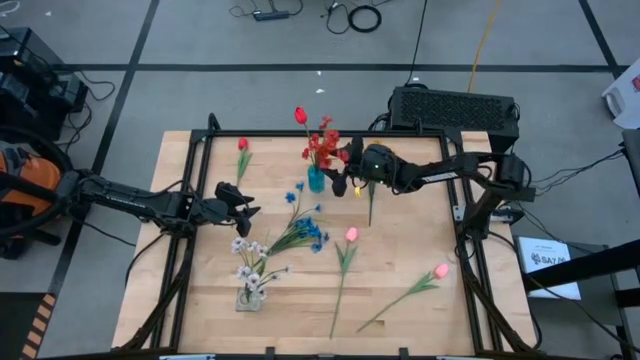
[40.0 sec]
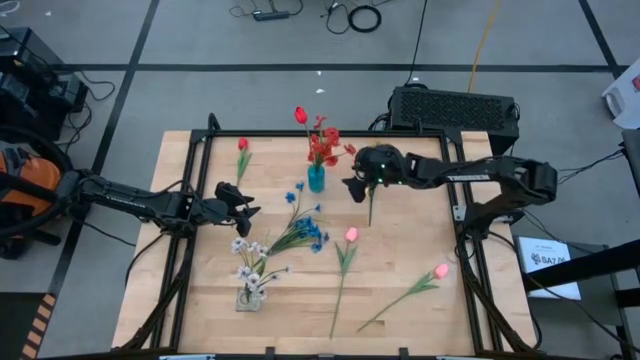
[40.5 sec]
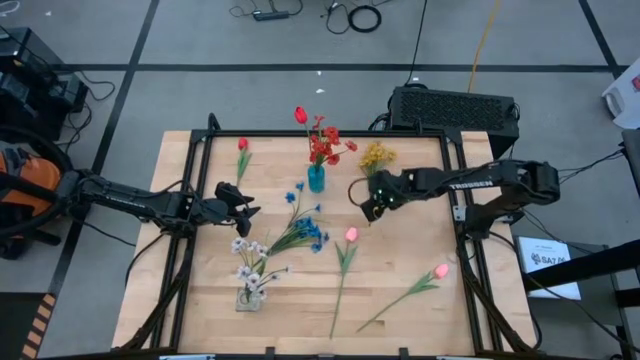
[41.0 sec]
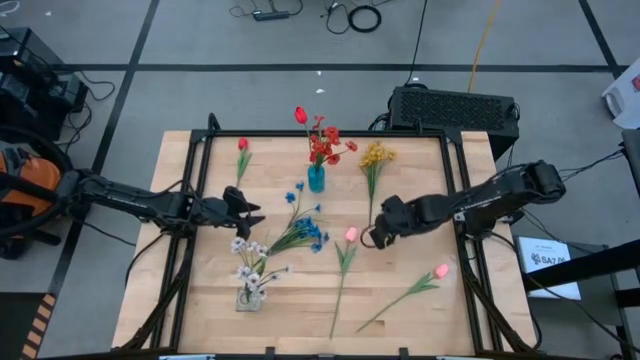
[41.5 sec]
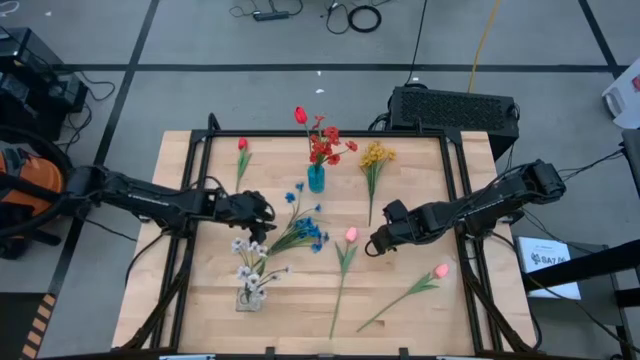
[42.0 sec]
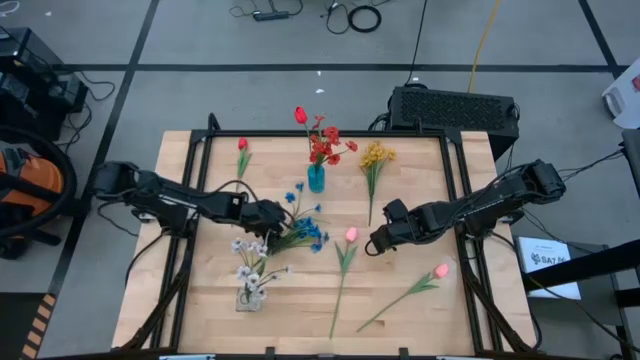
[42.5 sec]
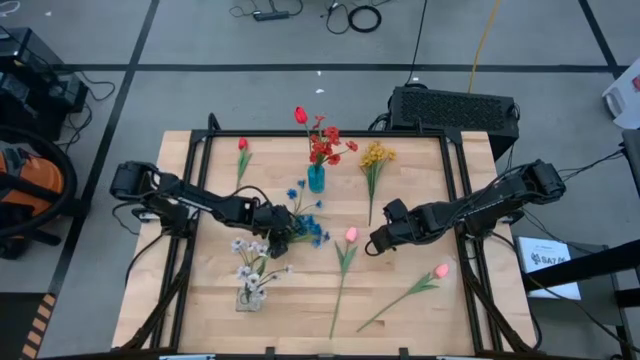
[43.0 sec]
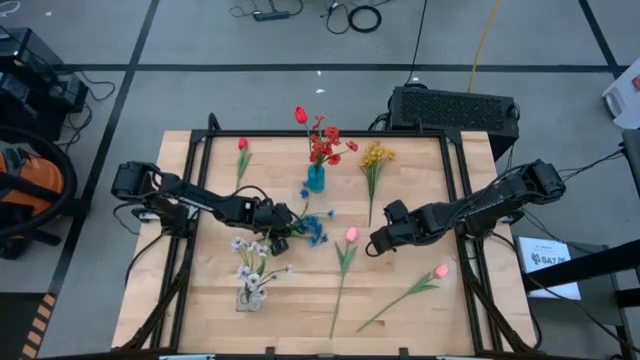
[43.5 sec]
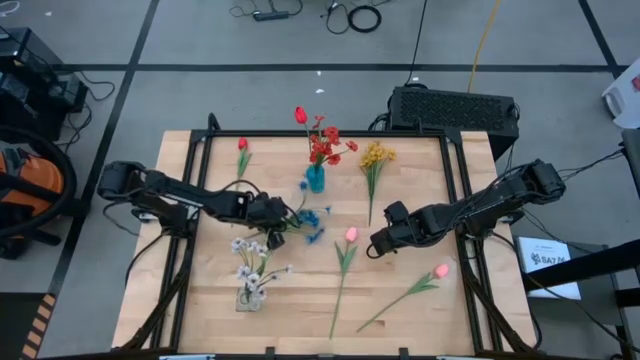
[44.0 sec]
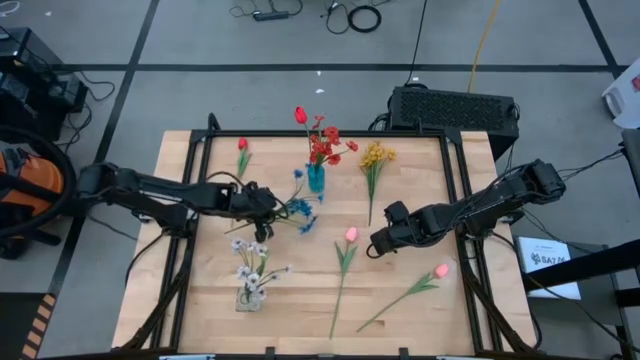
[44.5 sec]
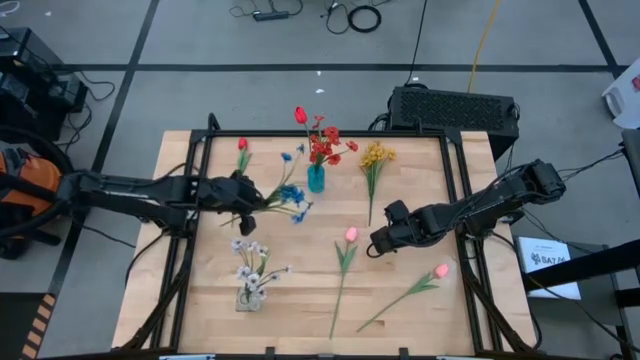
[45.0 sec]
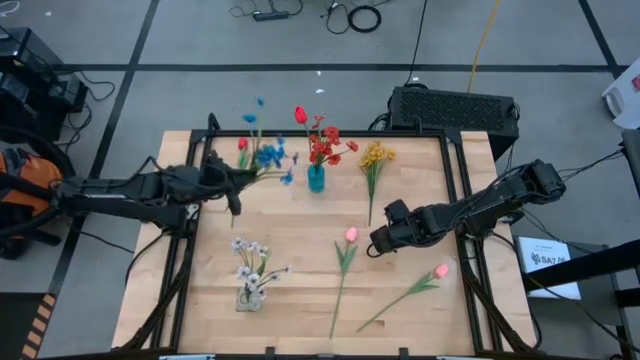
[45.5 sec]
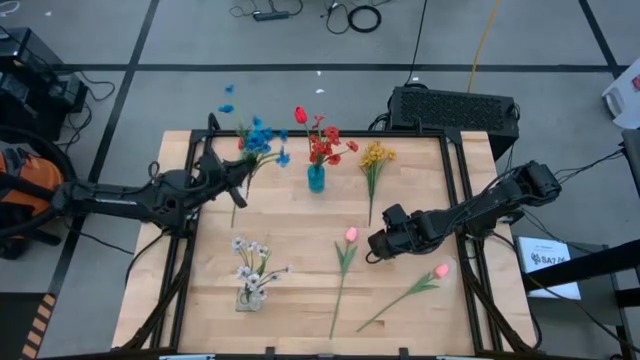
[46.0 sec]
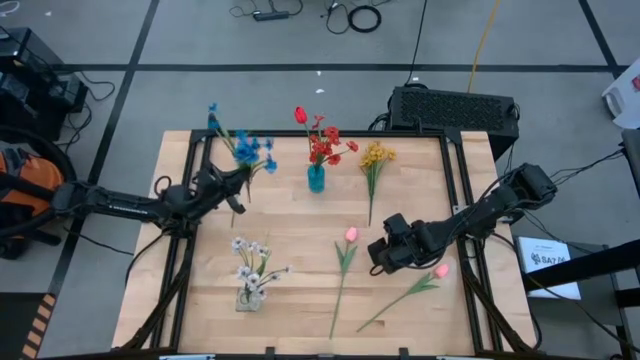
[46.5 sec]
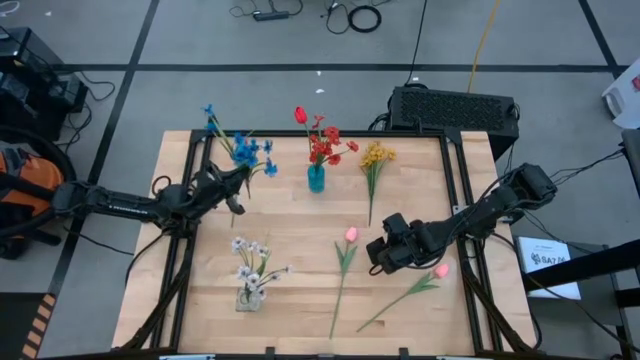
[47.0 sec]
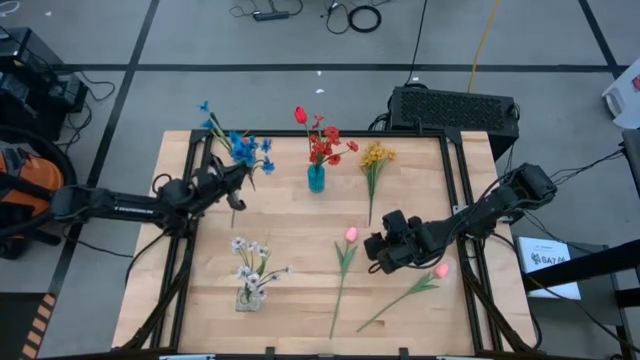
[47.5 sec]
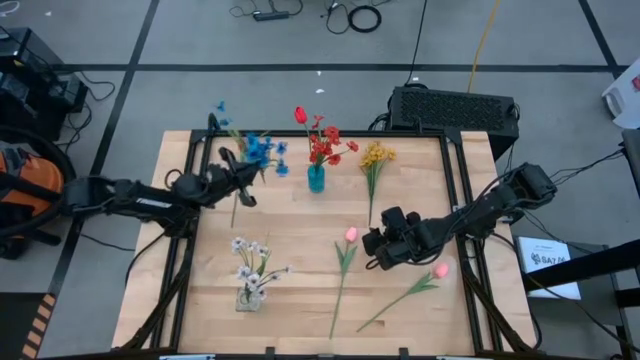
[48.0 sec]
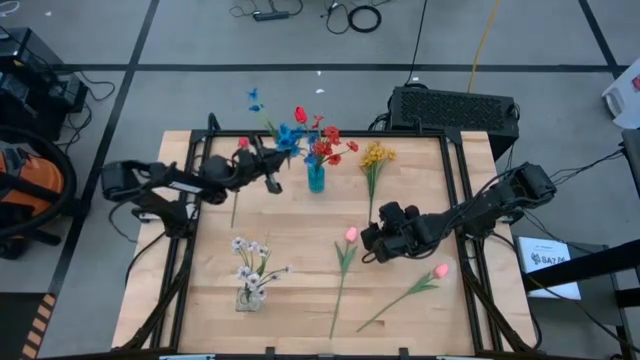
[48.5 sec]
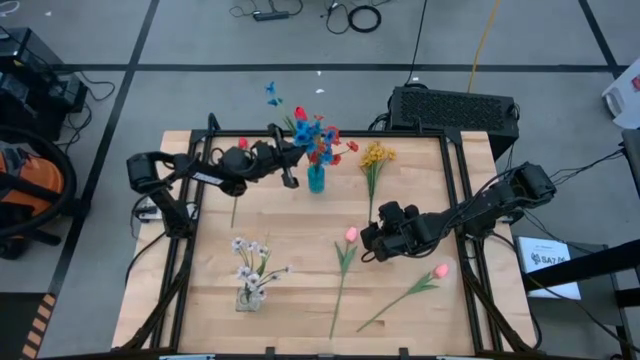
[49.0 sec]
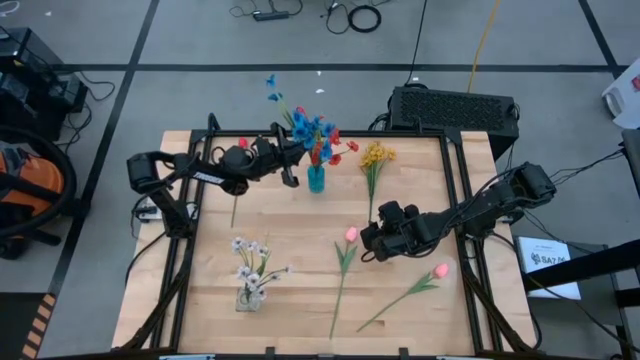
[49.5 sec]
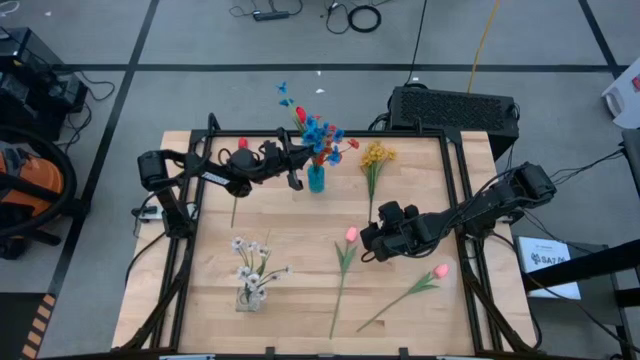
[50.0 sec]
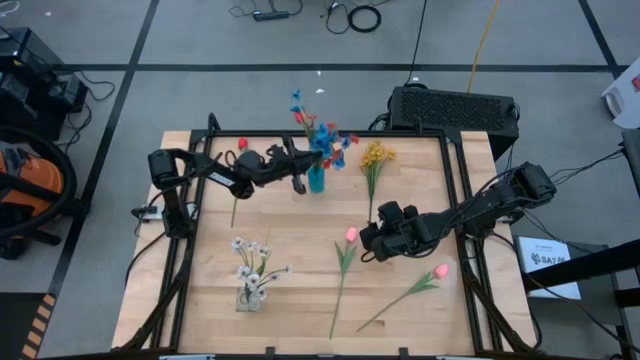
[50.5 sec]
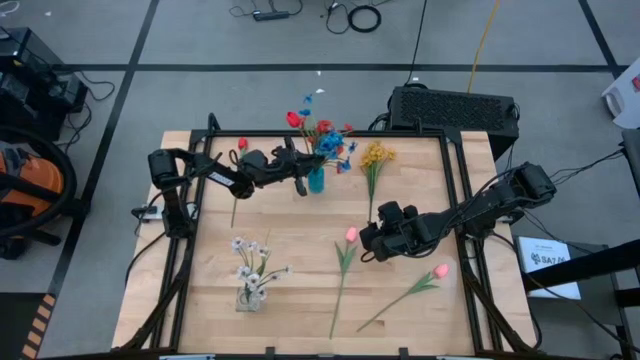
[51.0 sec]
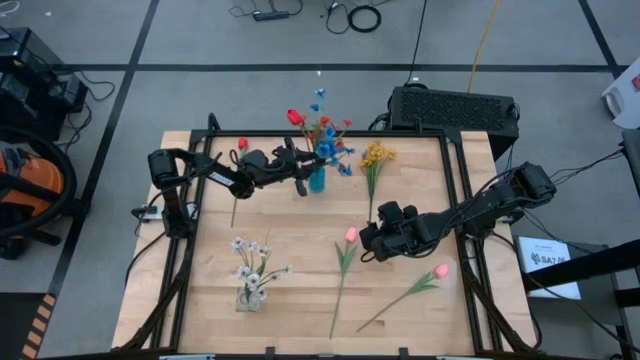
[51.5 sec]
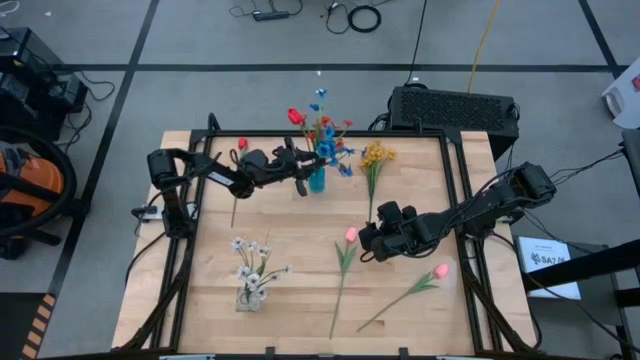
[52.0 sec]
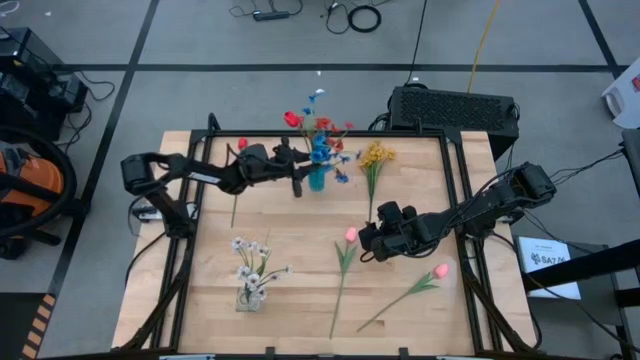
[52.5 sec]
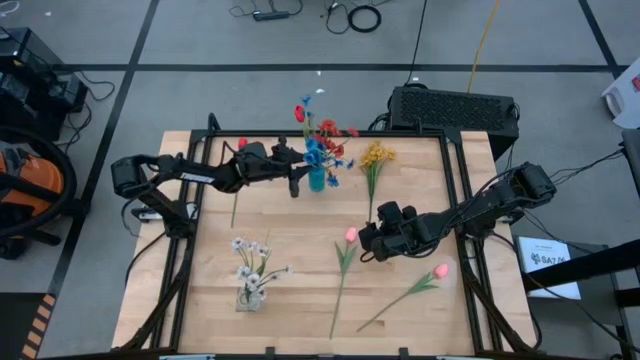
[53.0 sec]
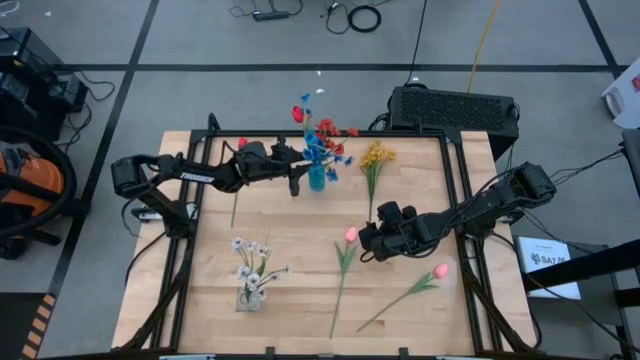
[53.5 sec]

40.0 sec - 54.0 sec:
Task: Sort flowers into vase by color
Put the blue flowers into the blue flower vase

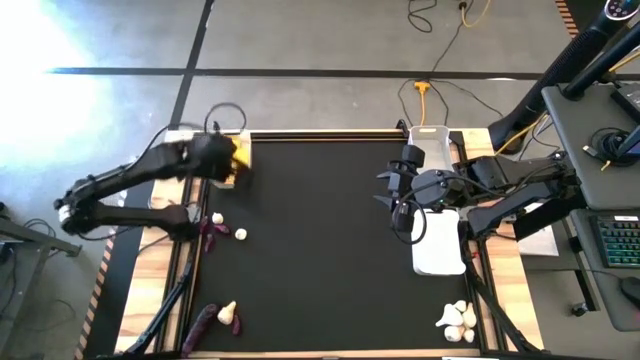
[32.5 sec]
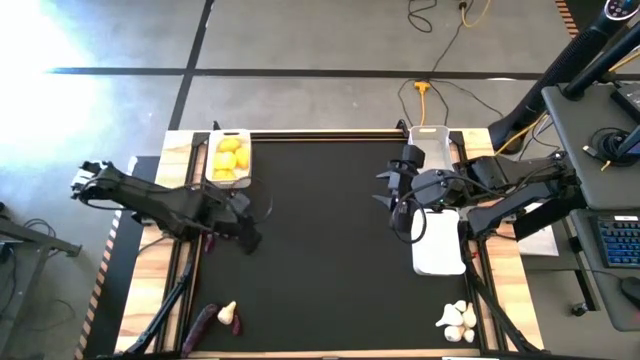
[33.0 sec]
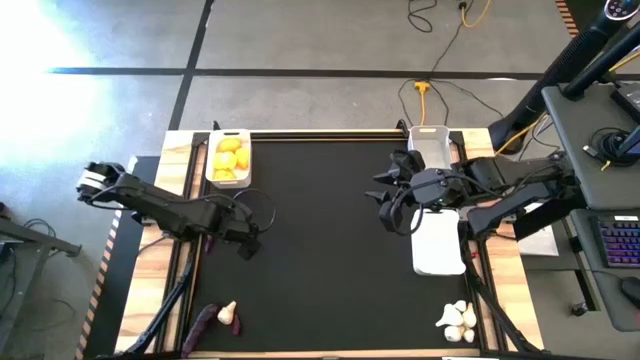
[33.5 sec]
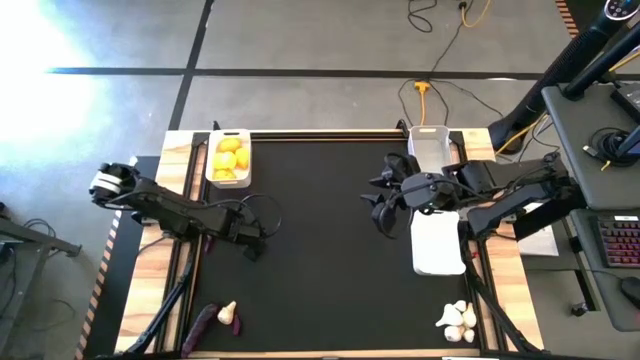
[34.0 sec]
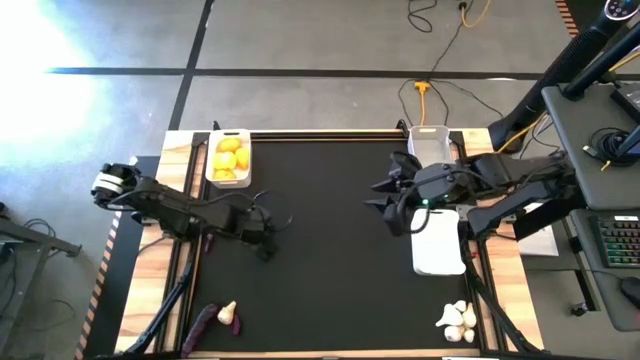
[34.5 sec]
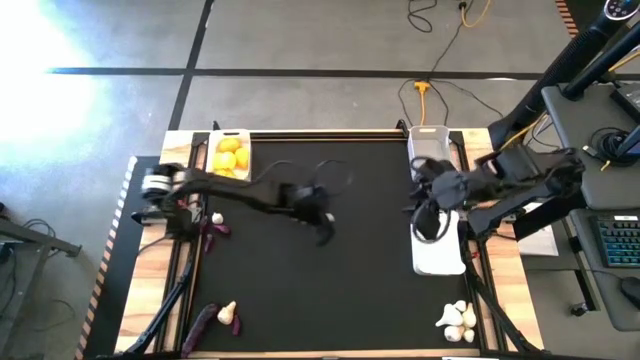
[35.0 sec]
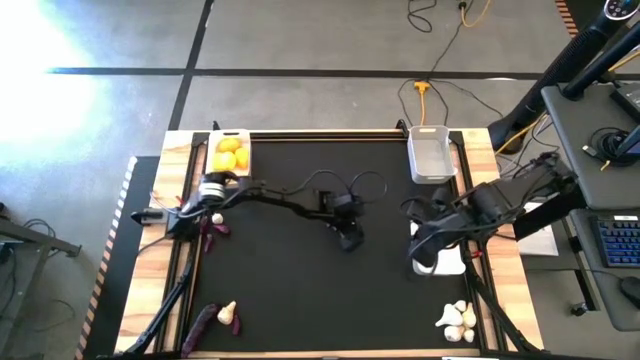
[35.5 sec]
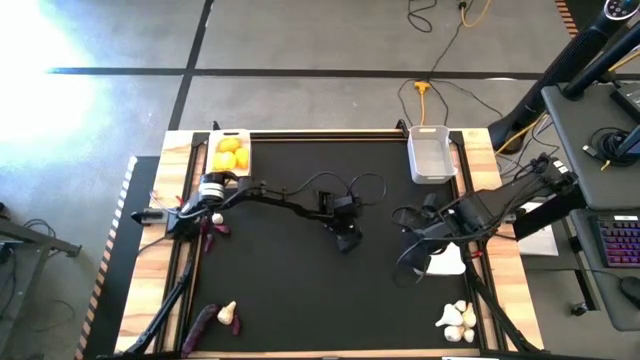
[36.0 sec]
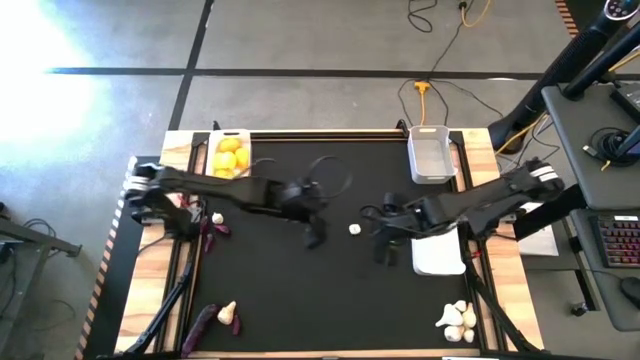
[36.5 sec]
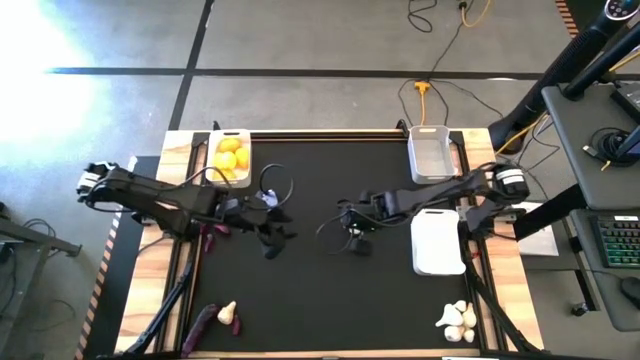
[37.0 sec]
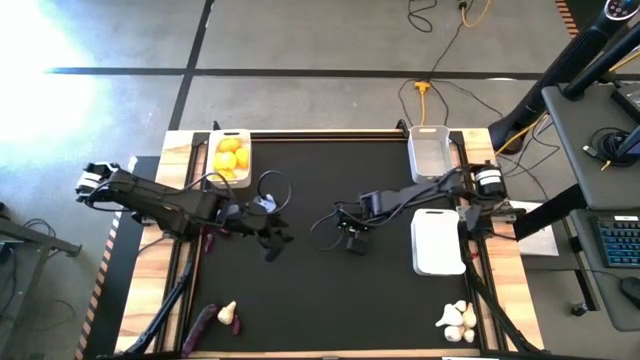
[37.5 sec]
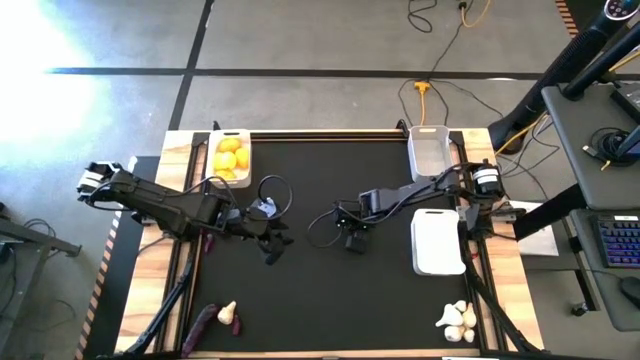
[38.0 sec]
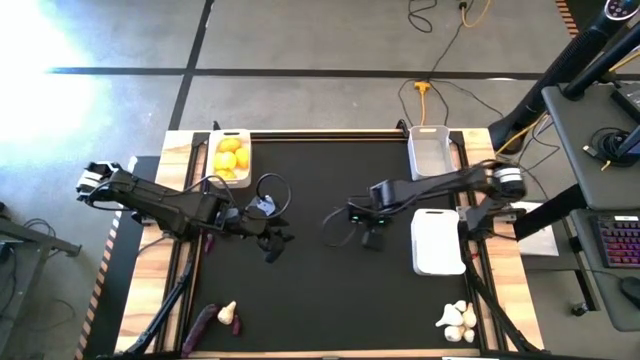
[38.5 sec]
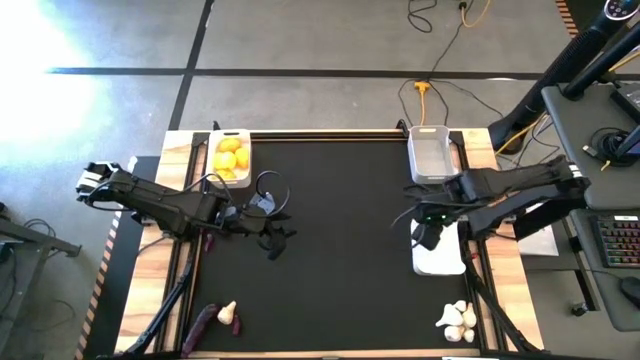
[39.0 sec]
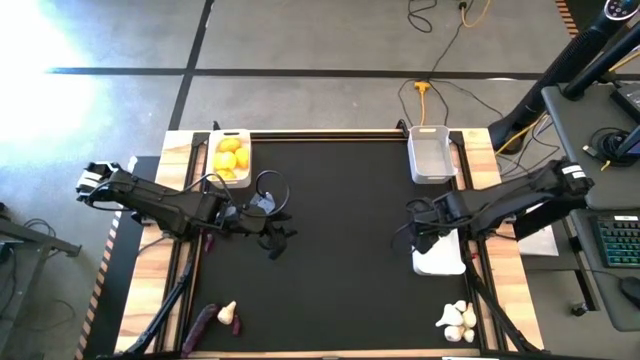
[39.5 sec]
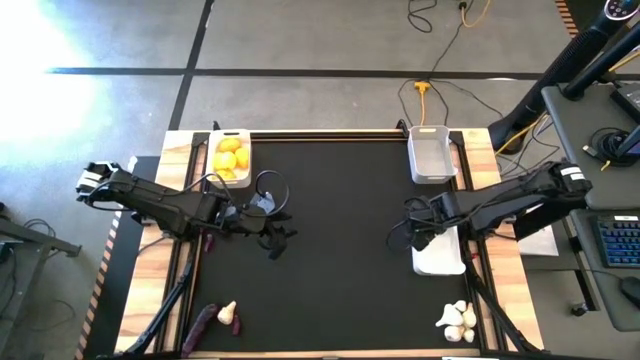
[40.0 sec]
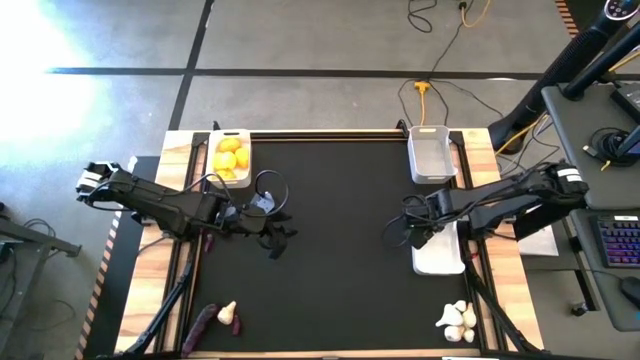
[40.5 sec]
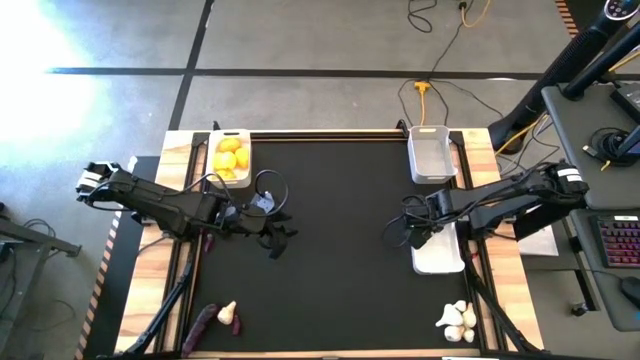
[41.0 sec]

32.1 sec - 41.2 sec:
Task: Sort produce into baskets
Put the white garlic into the right white bin
